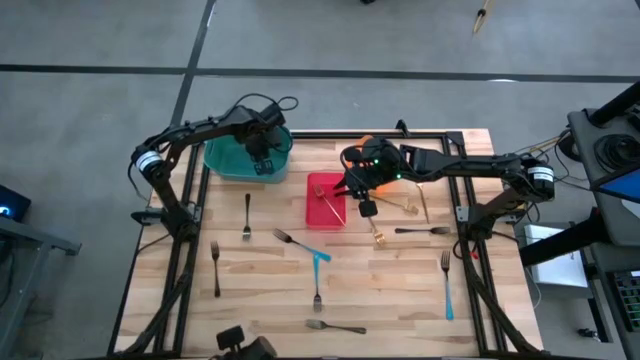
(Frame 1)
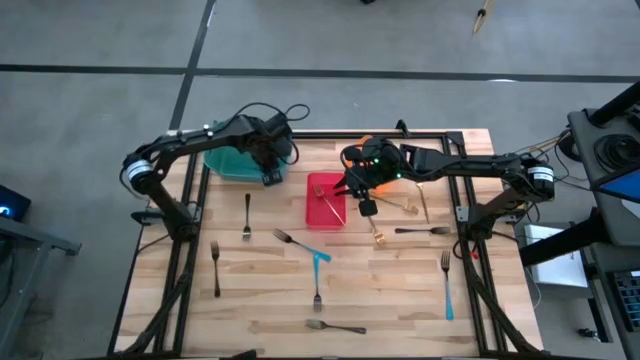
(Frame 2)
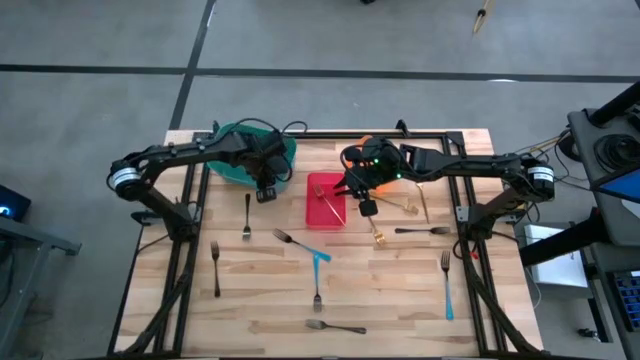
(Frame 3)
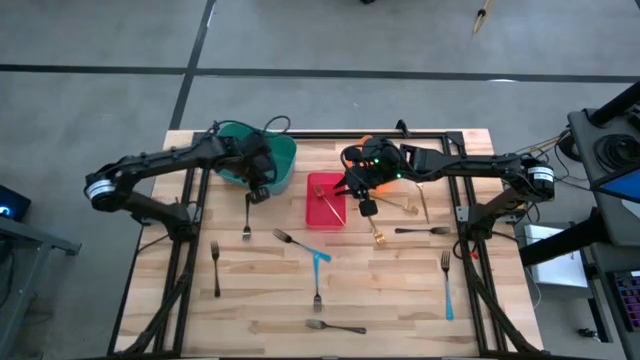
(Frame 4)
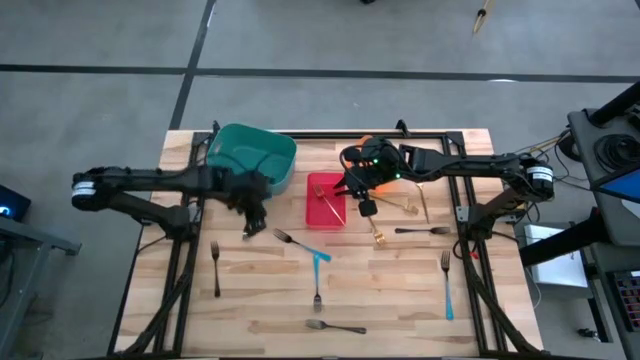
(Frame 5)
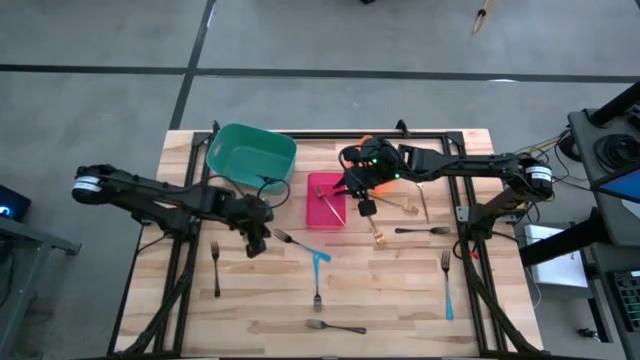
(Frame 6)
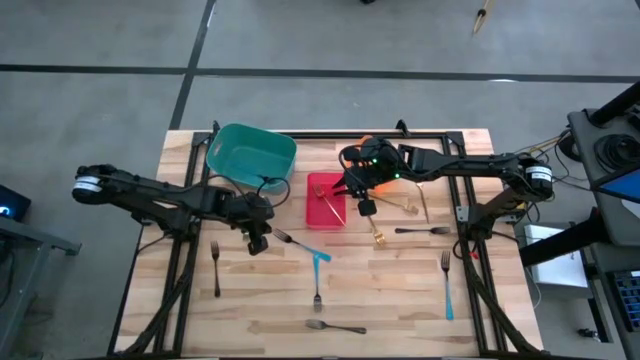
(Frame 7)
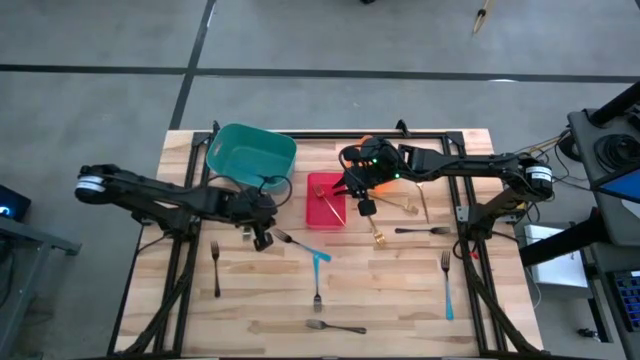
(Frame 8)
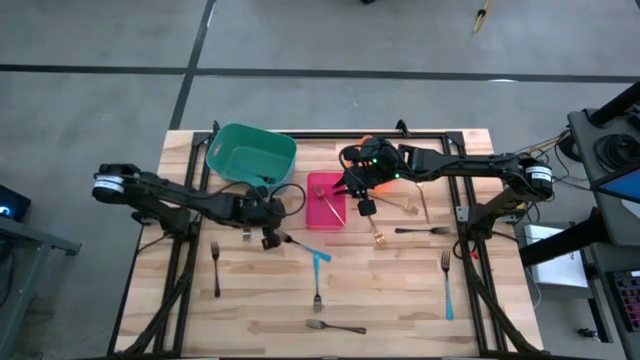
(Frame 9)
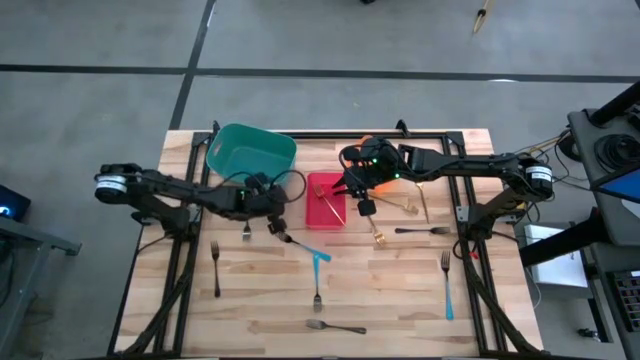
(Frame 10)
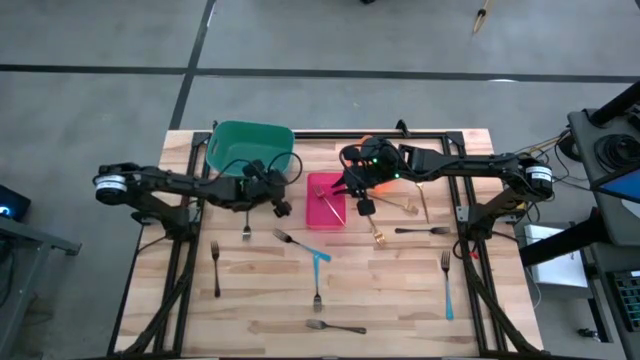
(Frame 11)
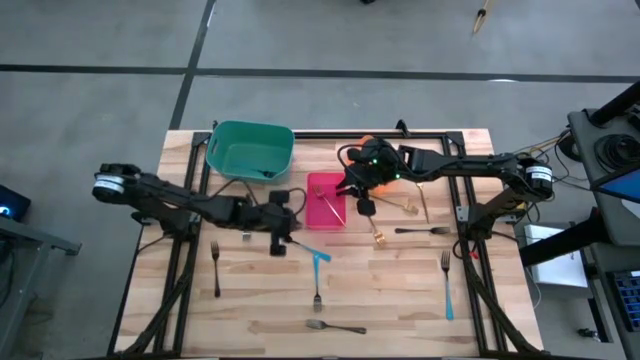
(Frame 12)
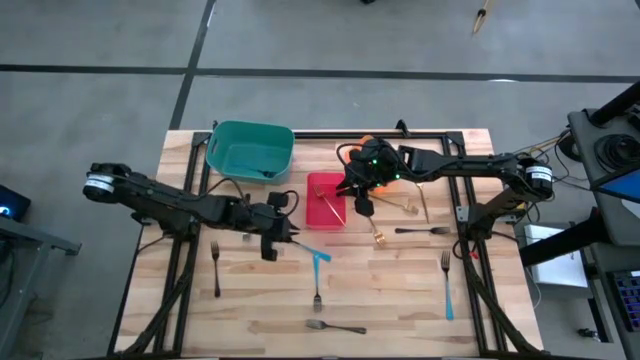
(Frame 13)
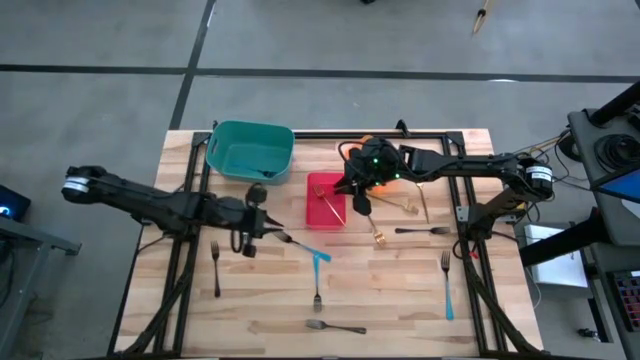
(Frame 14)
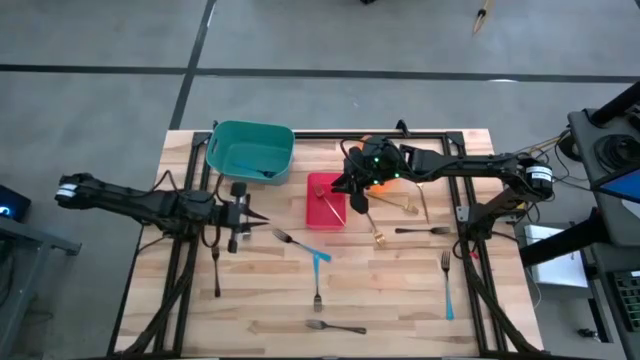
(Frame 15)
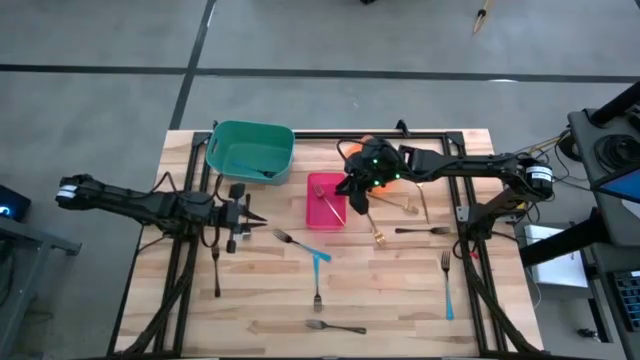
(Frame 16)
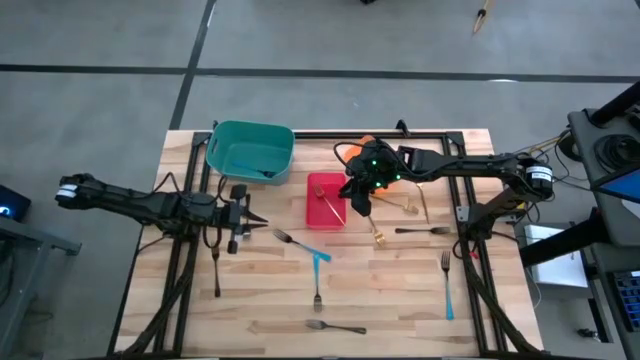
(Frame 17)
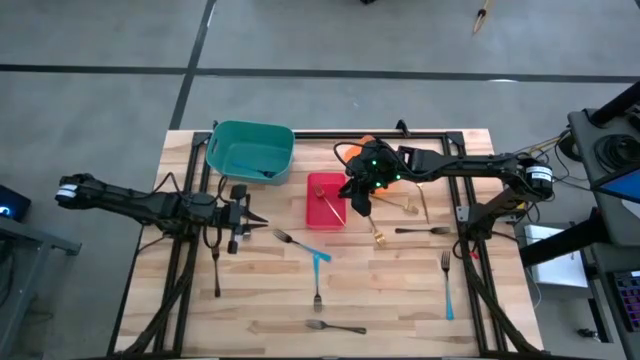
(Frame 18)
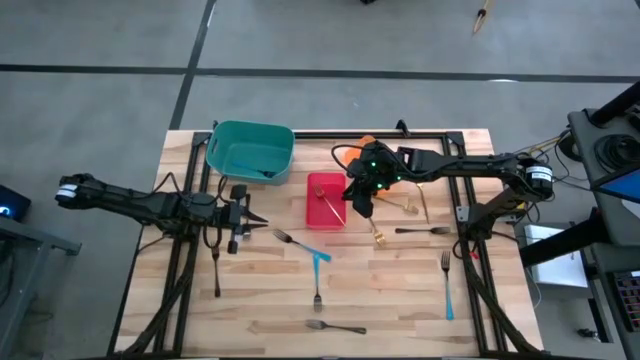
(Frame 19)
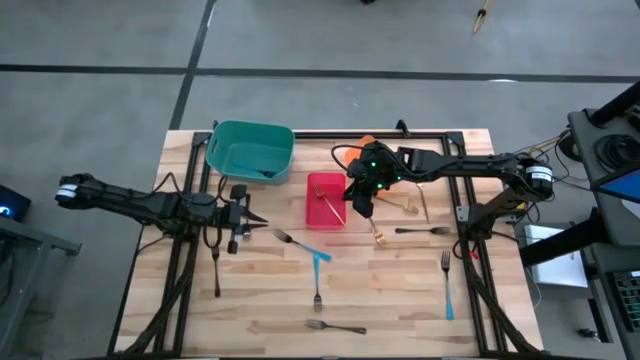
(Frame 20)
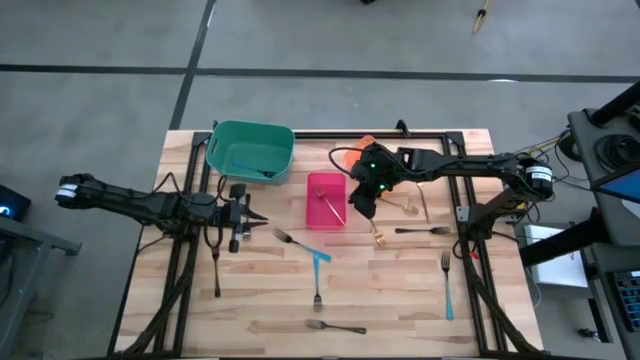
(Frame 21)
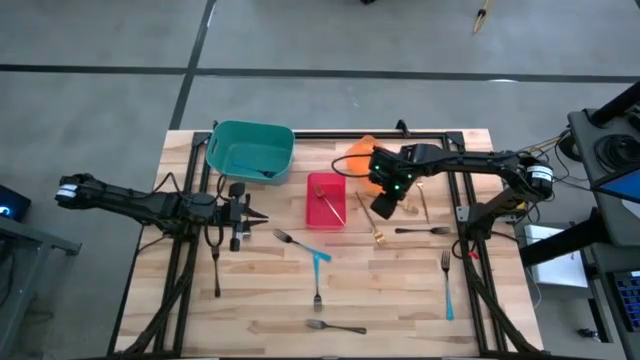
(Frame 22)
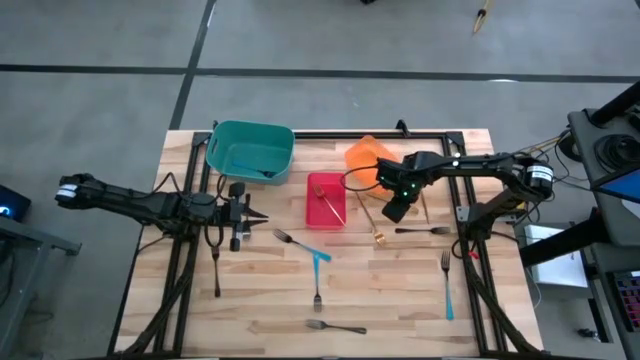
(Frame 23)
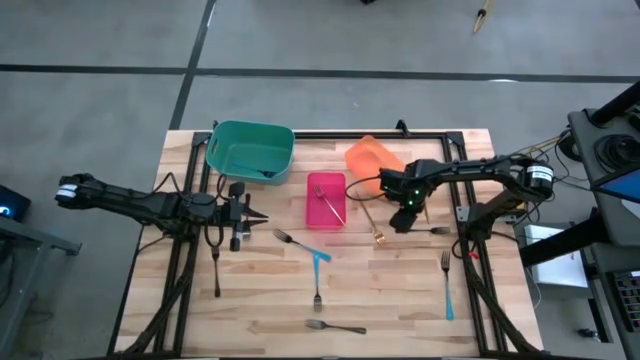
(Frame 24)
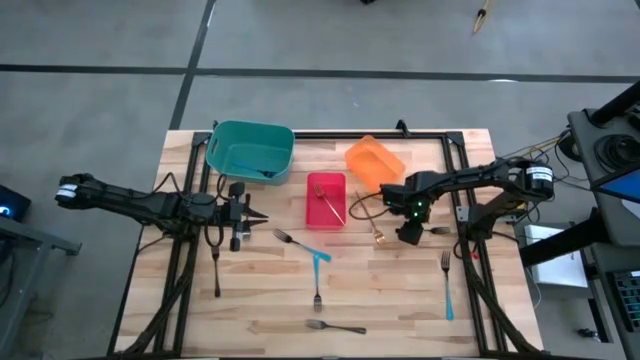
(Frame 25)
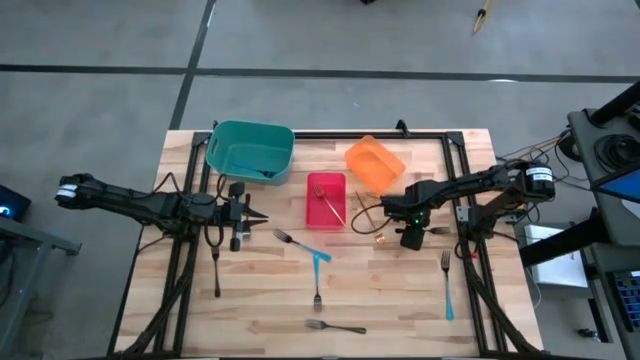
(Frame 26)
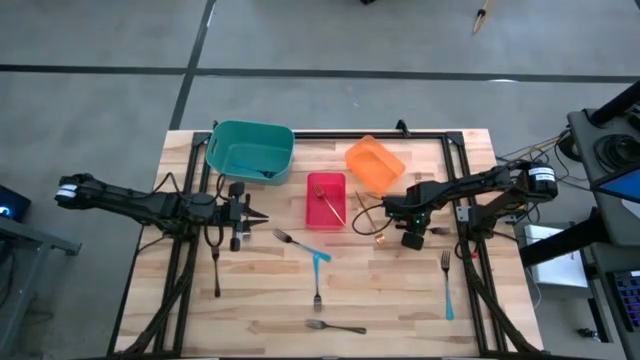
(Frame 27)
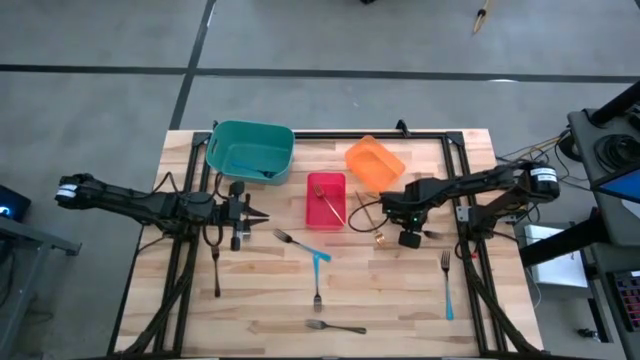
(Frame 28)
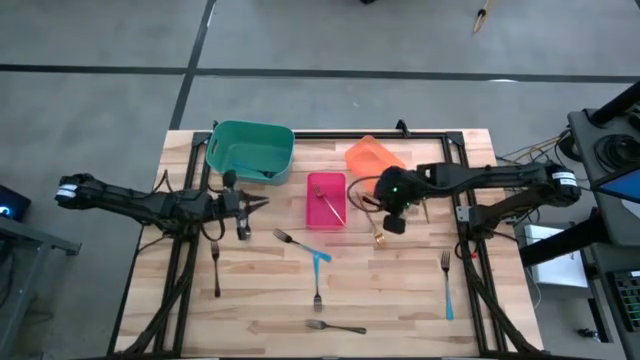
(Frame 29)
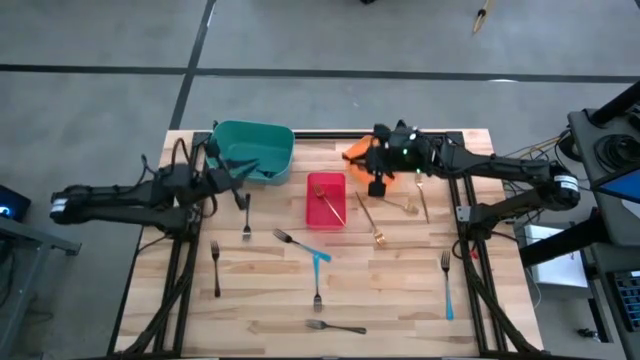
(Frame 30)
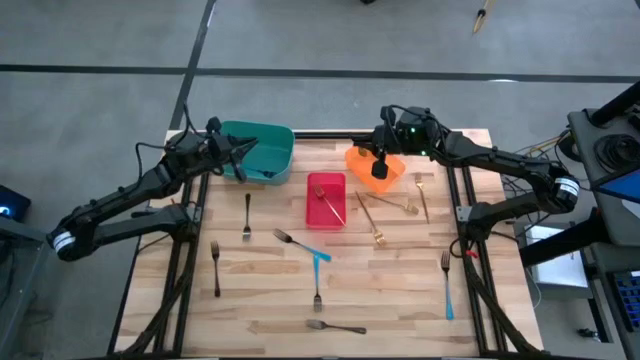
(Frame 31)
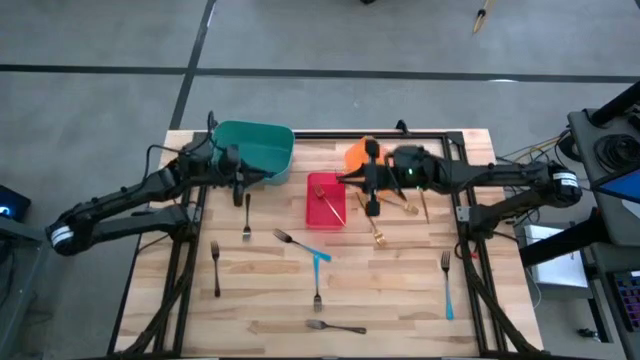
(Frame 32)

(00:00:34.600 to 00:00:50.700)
Task: Sort silverware by color (type)
Put the black fork into the orange bin

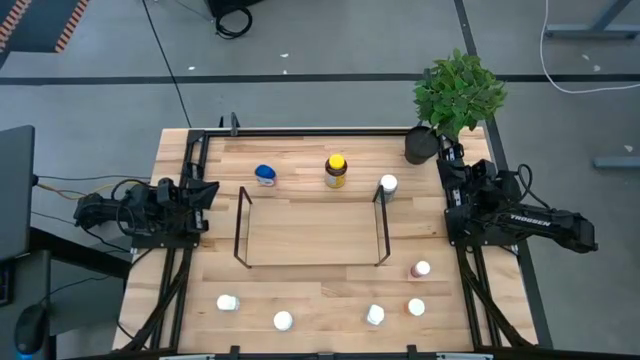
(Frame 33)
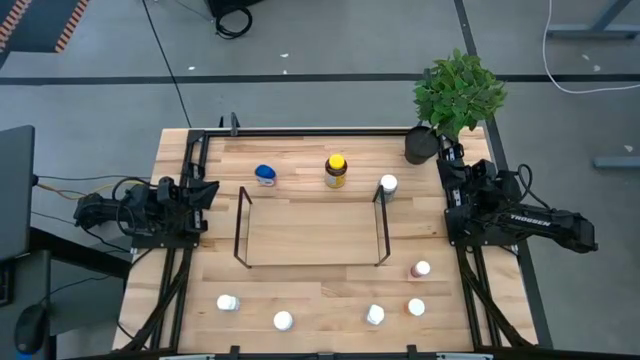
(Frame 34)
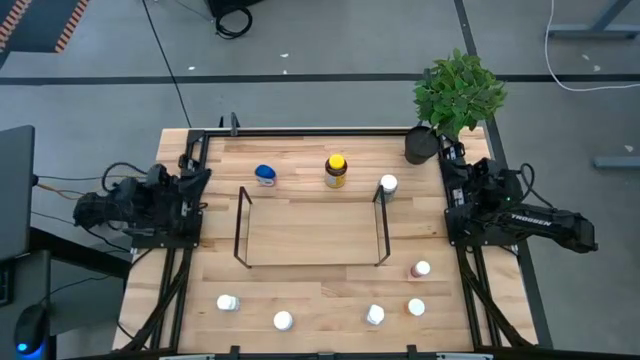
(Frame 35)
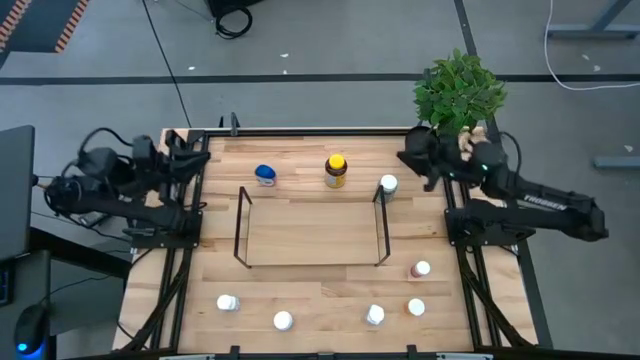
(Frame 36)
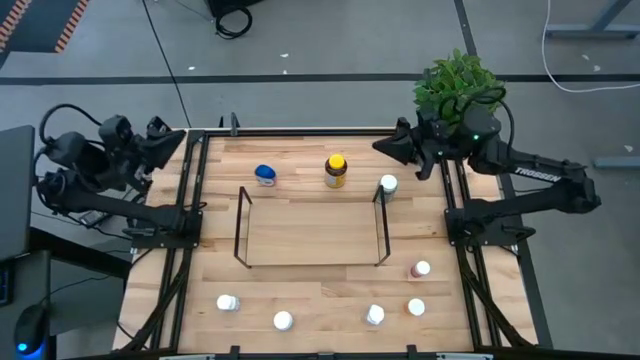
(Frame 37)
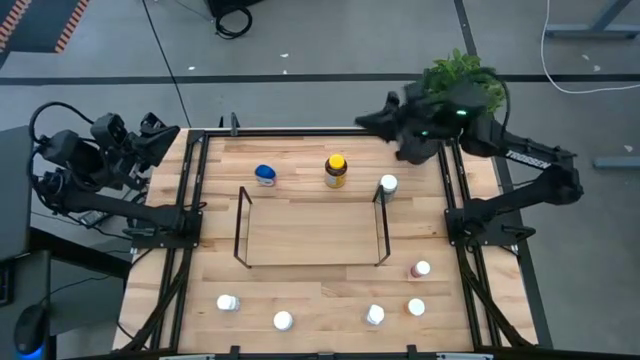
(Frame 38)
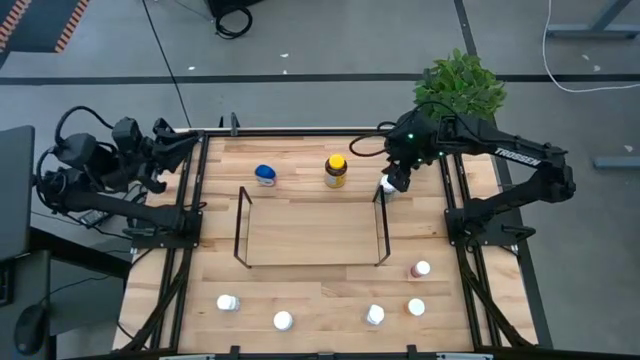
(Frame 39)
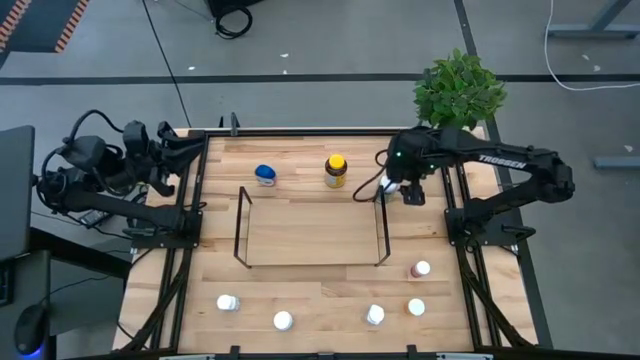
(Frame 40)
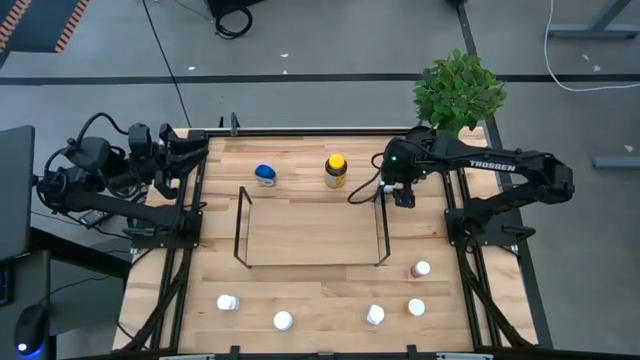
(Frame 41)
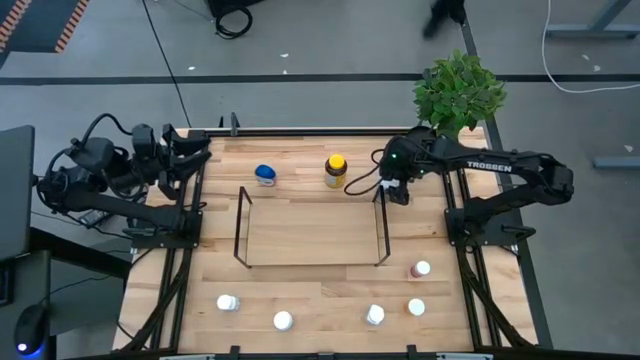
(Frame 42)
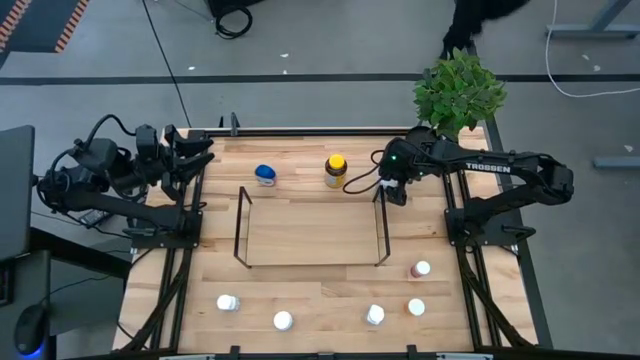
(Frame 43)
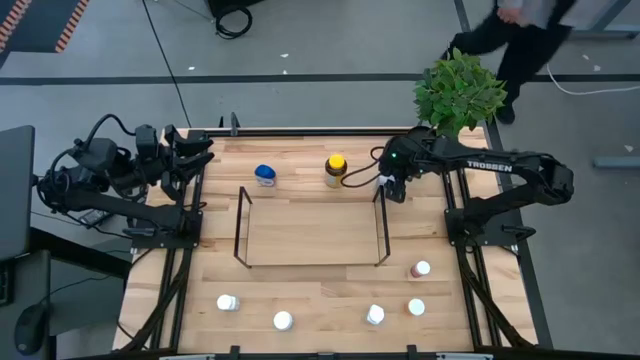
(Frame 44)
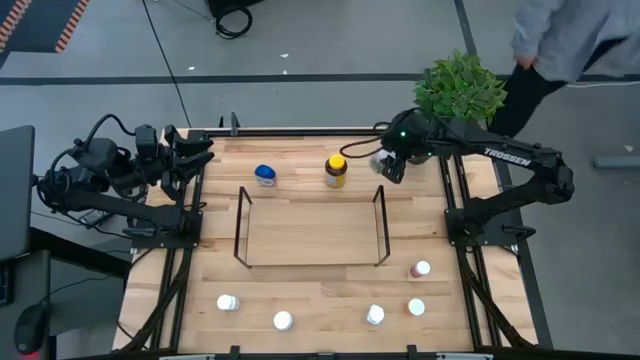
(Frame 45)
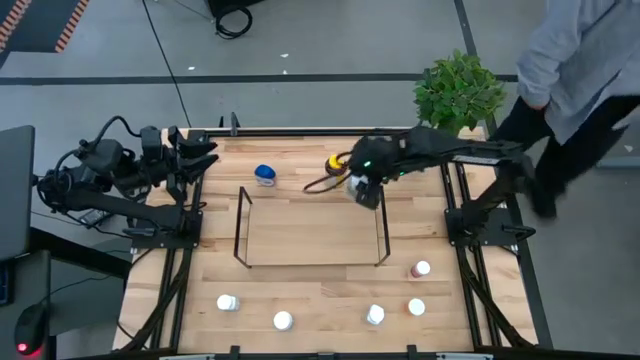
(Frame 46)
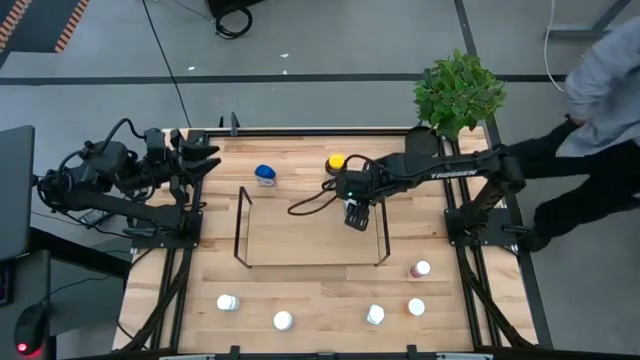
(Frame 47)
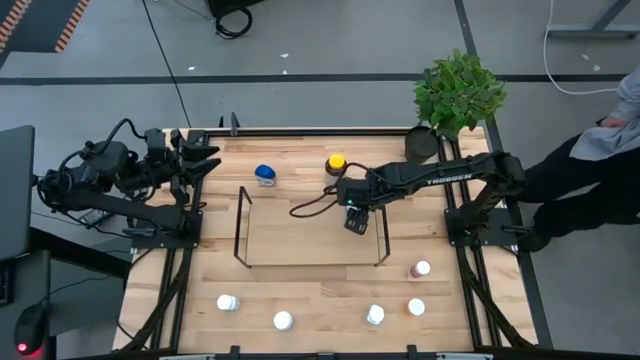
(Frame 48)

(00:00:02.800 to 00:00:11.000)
Task: Pick and place medicine bottles onto shelf by color
Put the green medicine bottle on the shelf
